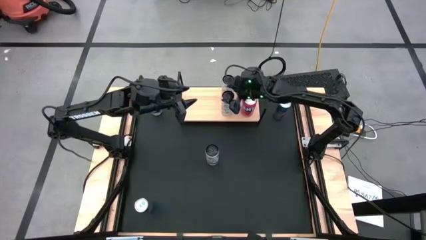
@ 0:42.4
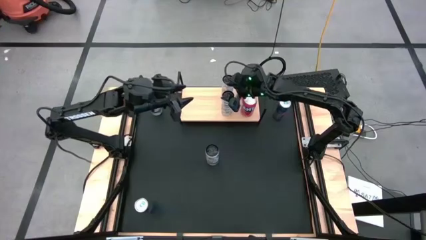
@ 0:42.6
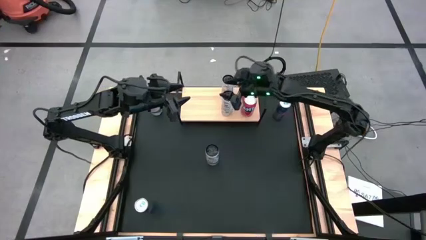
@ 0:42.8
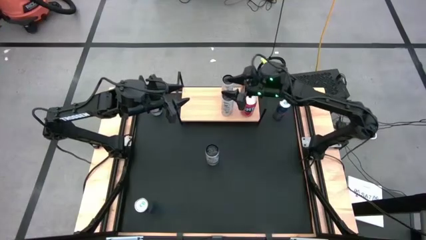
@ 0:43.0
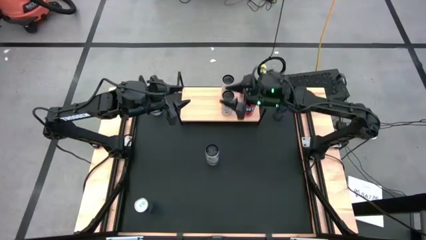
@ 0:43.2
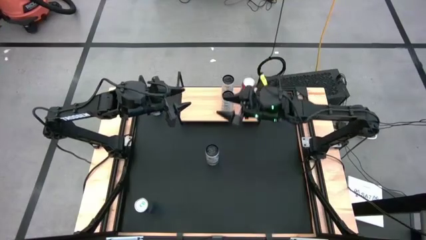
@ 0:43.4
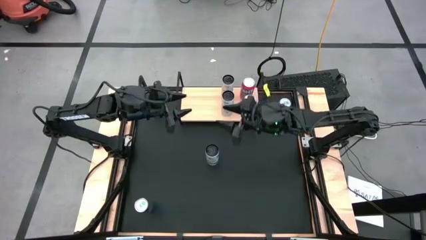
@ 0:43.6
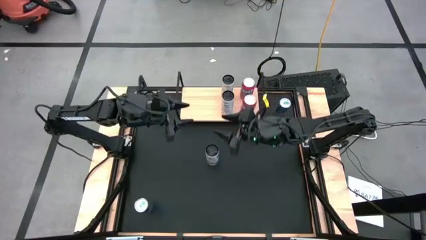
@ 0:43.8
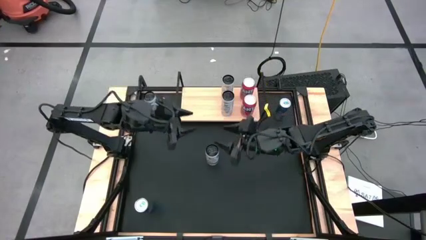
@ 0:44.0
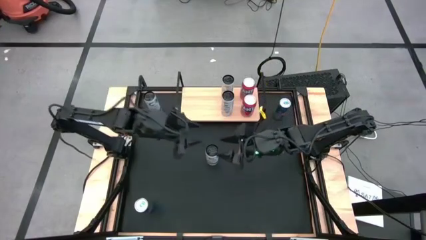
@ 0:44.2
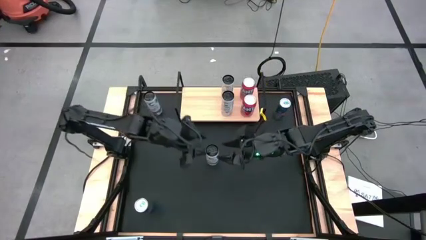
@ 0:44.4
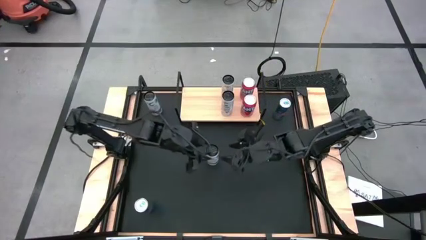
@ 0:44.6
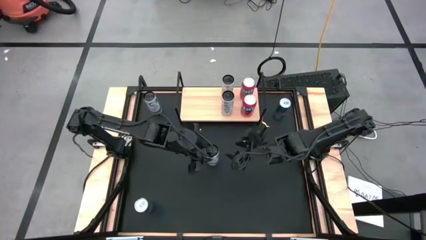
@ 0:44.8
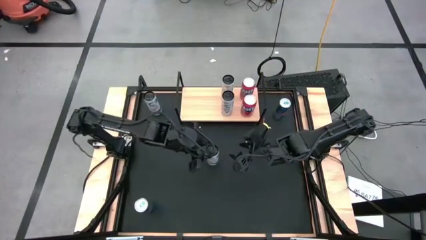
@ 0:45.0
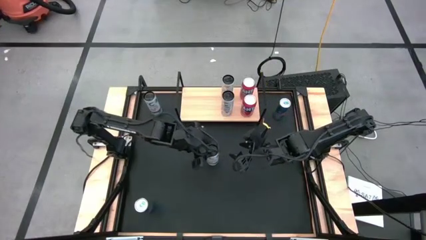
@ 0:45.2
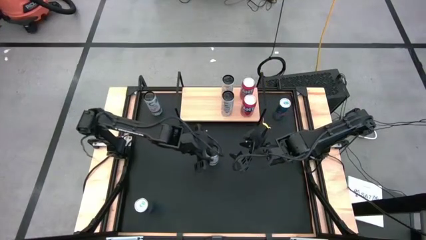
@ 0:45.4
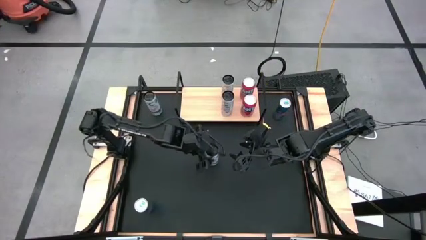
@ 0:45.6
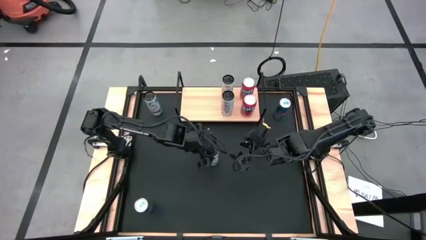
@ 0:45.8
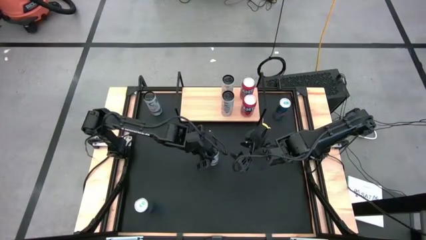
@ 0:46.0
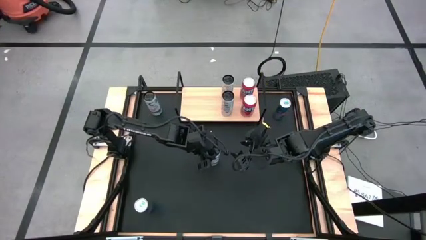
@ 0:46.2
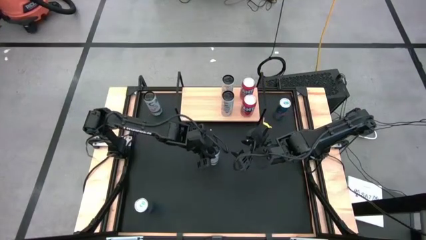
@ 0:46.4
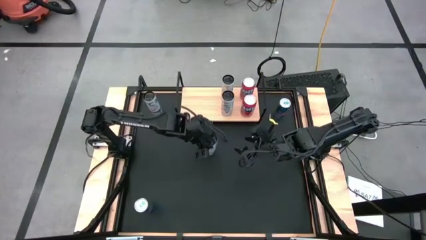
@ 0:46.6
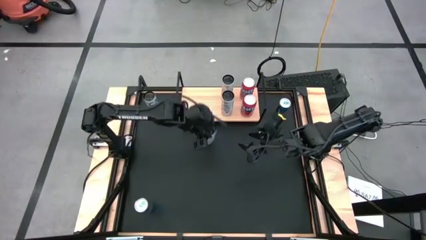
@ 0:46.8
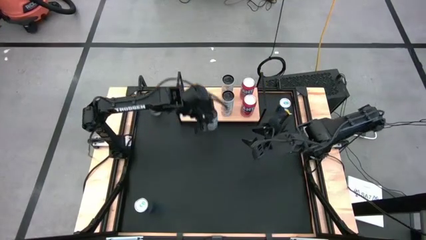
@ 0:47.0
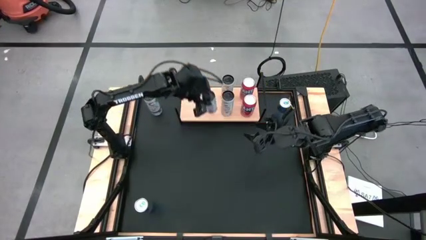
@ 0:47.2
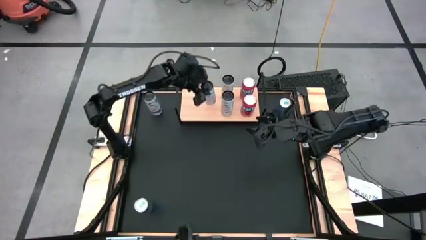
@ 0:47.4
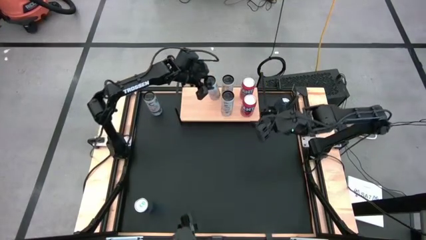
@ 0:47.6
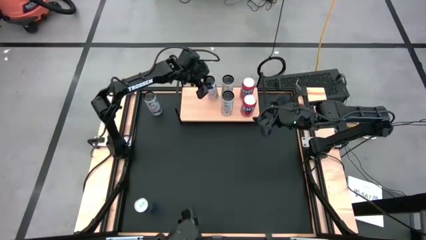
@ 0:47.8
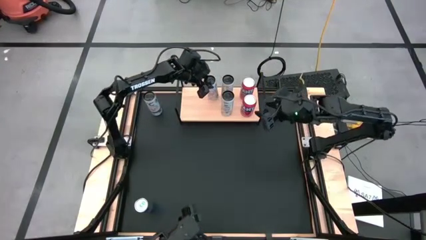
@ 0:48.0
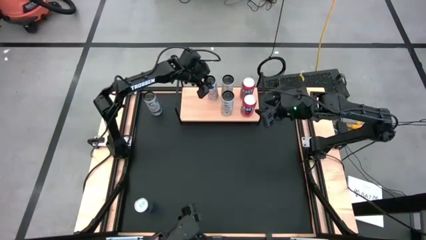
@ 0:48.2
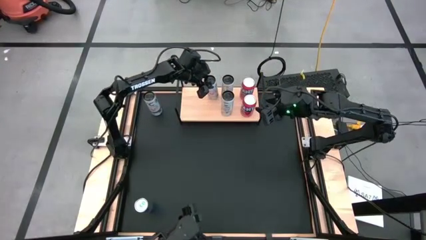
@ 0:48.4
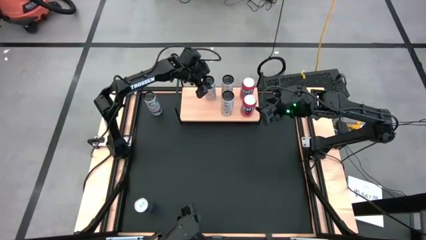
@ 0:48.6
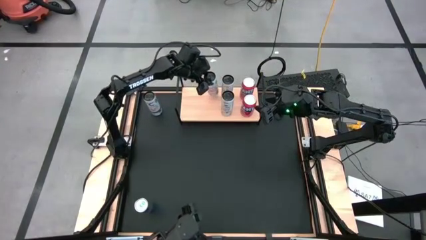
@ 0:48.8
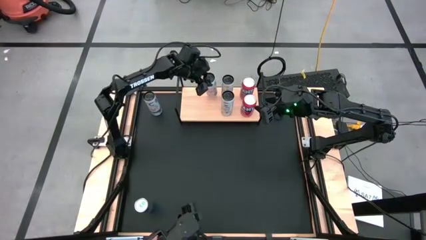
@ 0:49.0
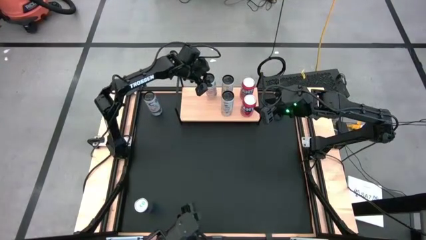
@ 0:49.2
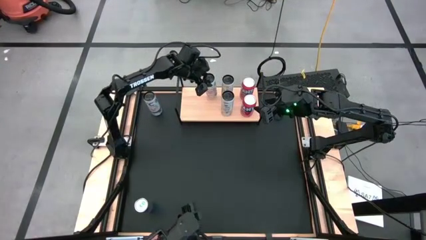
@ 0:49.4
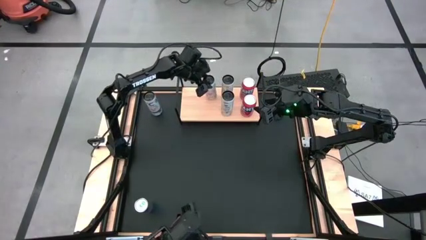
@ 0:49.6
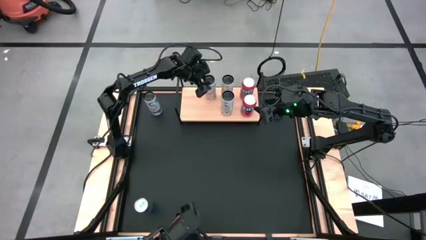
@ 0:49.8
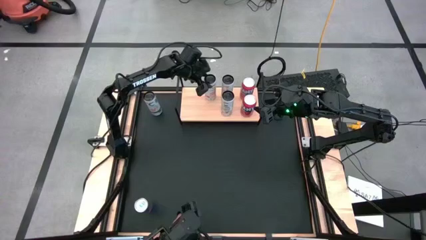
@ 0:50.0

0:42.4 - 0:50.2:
Task: Place canned beverage on shelf
Put the bottom white pink soda can on the shelf

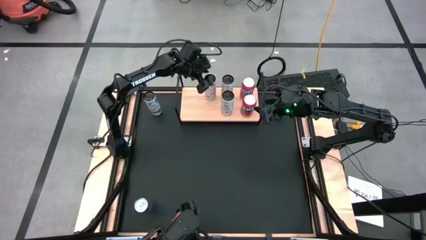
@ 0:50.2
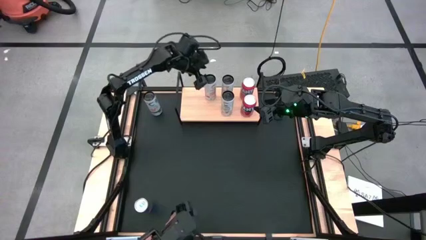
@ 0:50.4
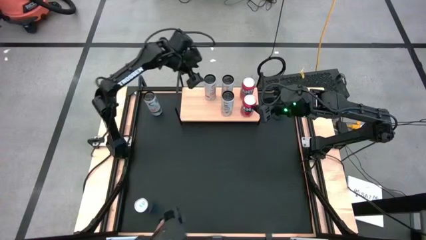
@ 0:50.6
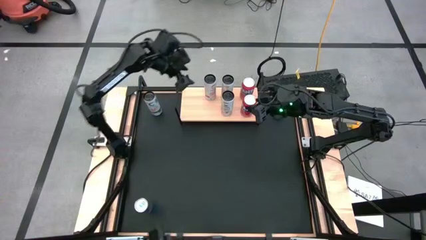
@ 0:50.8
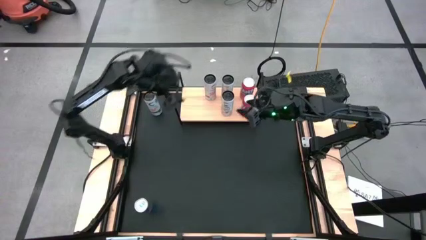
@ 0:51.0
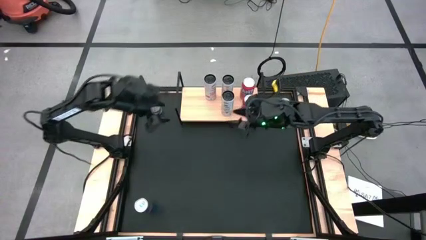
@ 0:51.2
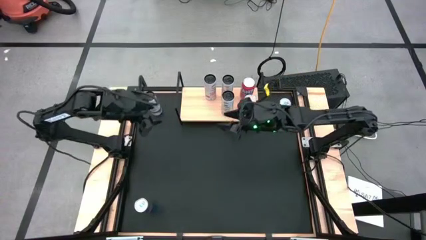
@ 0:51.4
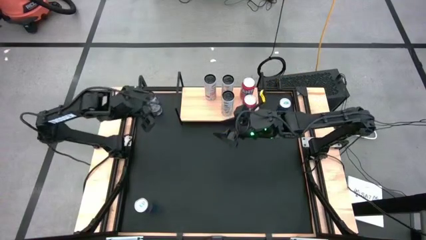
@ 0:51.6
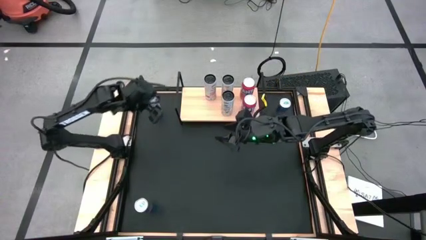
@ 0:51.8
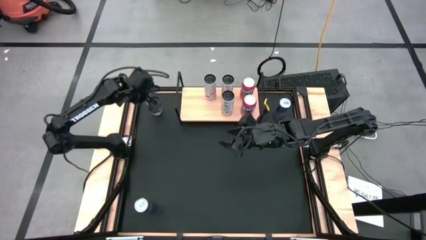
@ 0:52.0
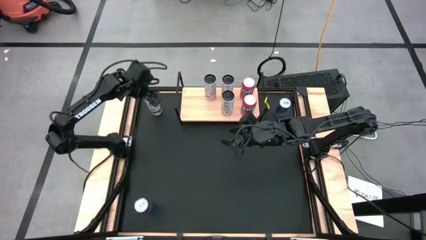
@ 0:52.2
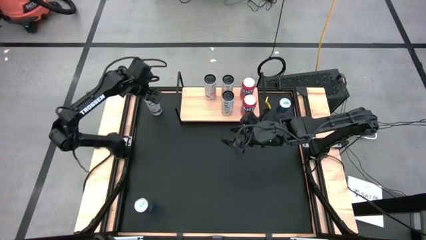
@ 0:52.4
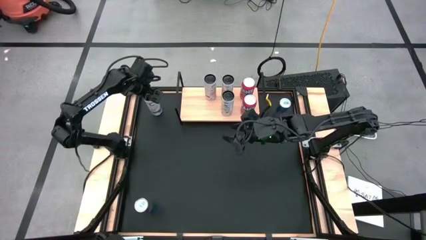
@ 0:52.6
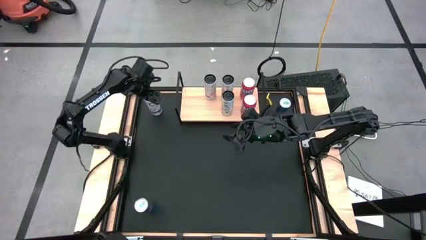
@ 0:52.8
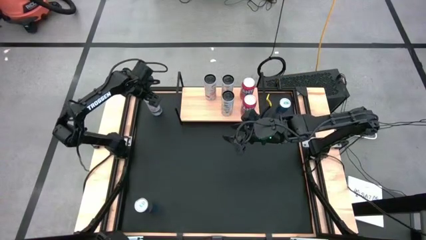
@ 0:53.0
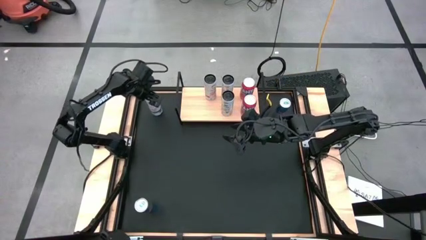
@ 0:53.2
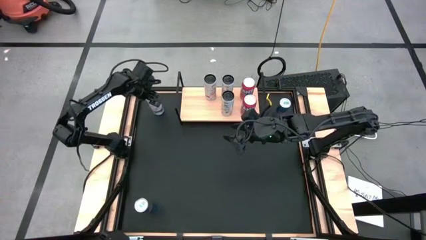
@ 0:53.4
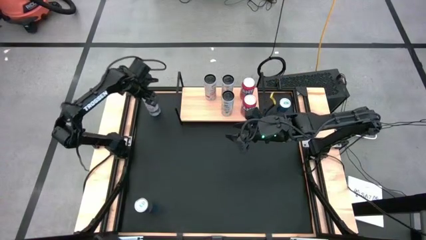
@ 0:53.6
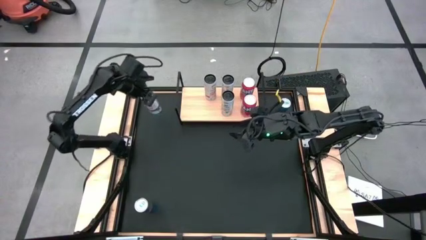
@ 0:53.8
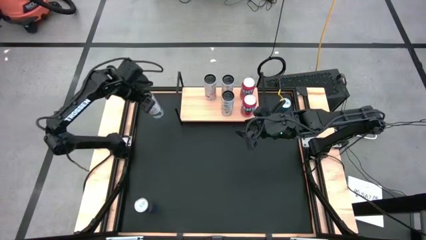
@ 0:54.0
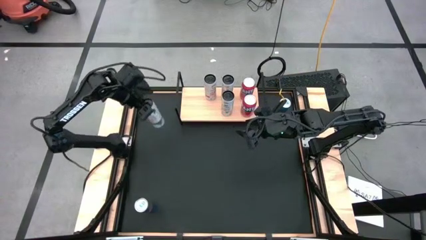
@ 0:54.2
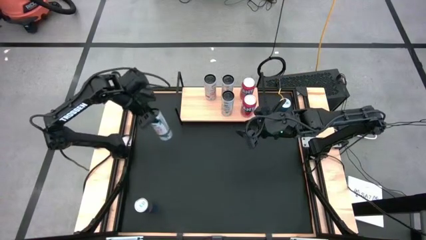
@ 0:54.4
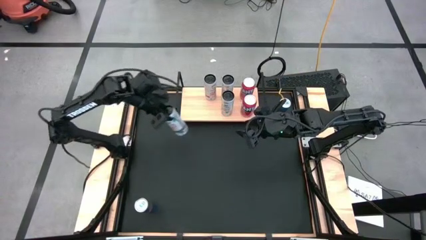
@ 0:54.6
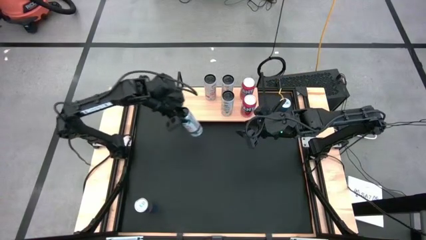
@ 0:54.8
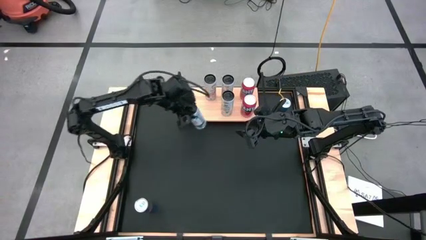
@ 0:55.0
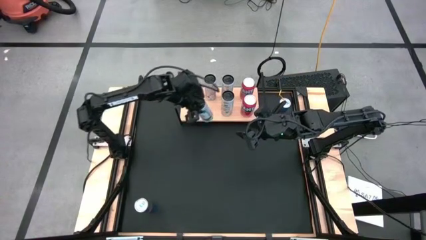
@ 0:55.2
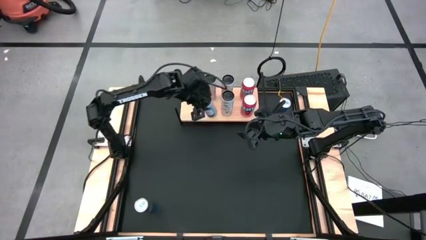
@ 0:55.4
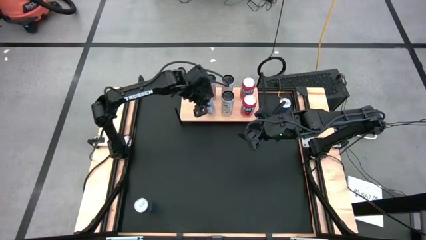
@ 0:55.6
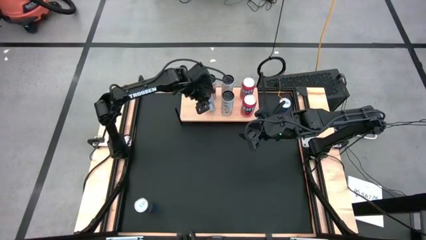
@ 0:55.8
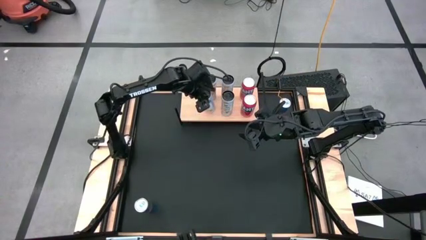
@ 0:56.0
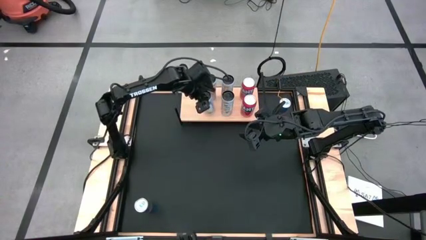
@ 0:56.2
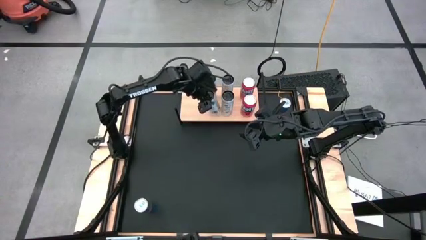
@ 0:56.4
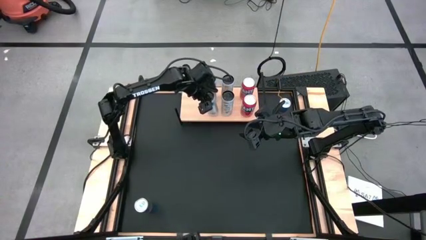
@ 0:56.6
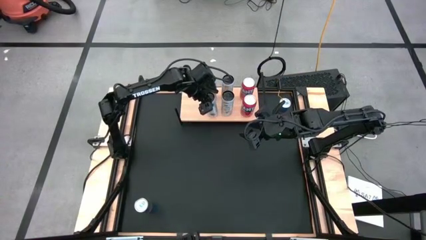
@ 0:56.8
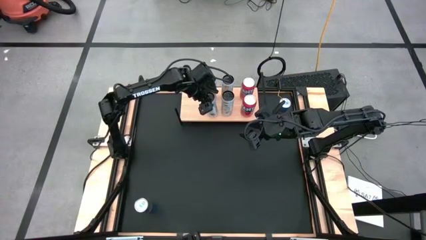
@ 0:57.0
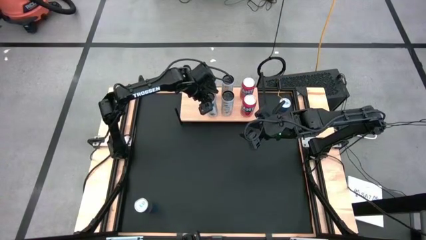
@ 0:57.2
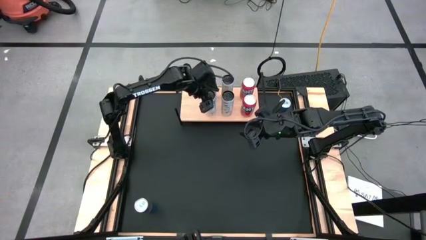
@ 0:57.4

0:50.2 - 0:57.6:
Put the white pink soda can on the shelf aligned with the other white pink soda can
